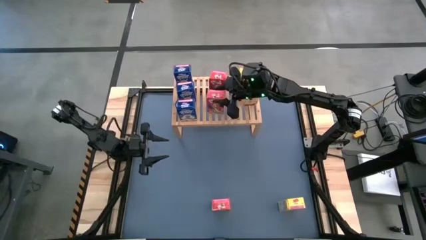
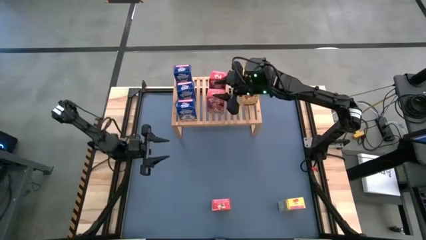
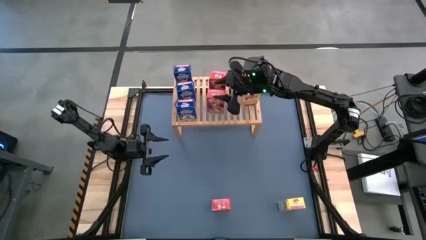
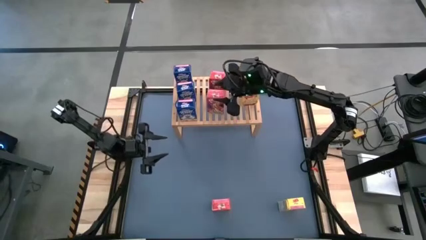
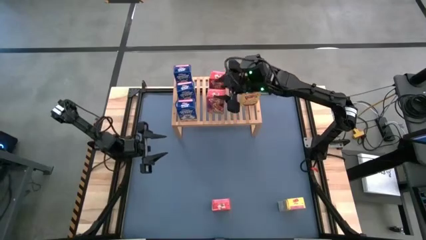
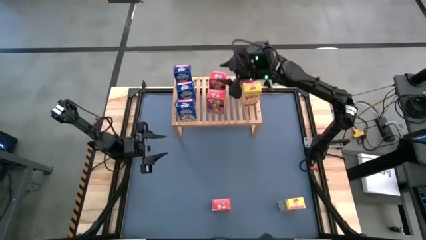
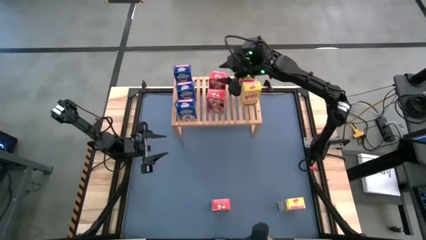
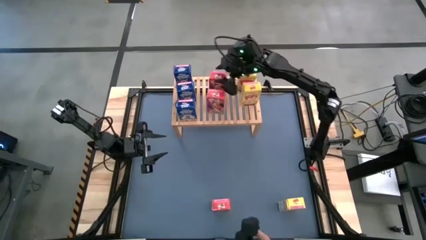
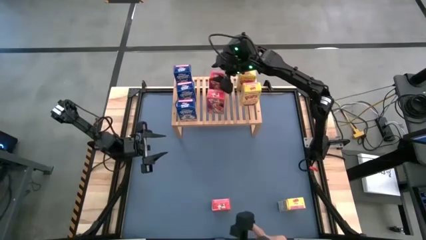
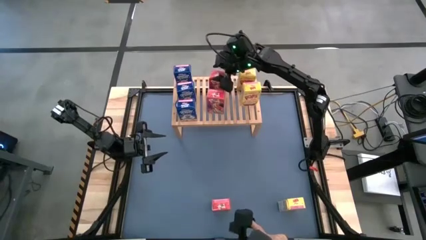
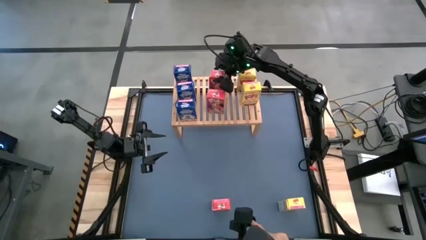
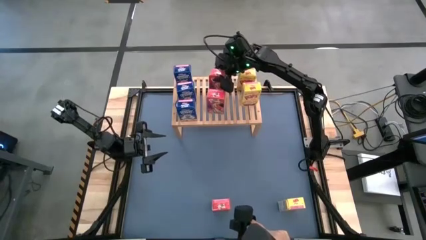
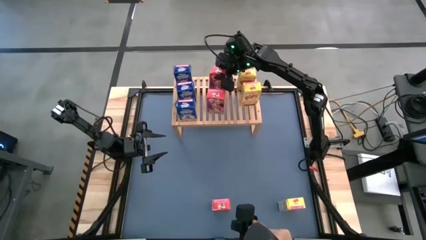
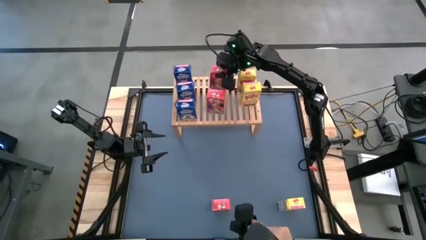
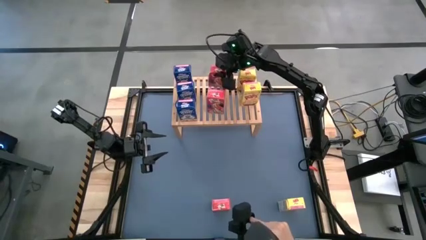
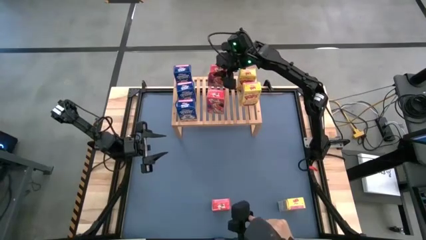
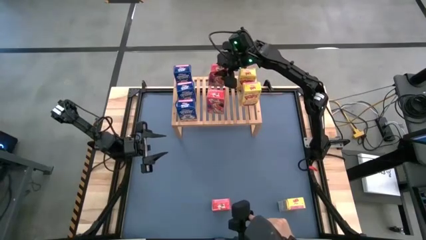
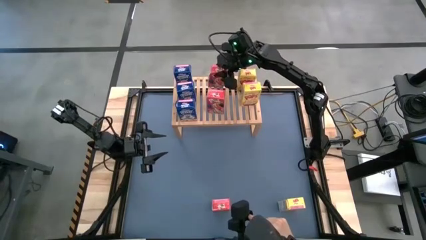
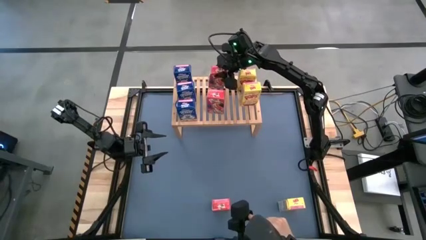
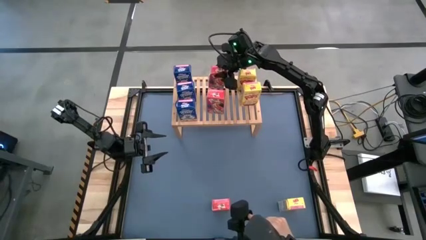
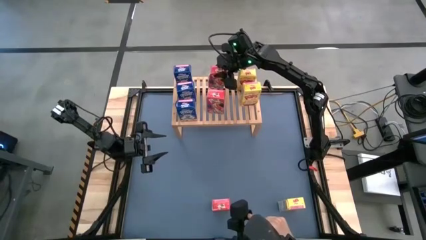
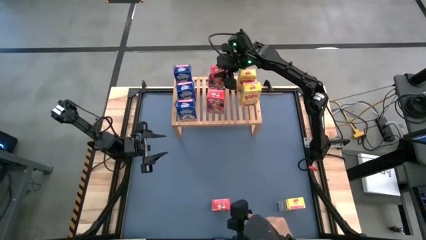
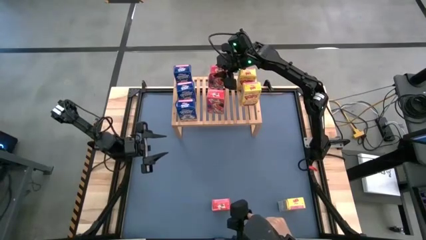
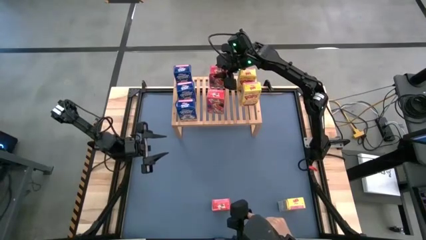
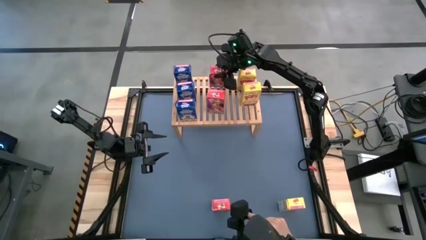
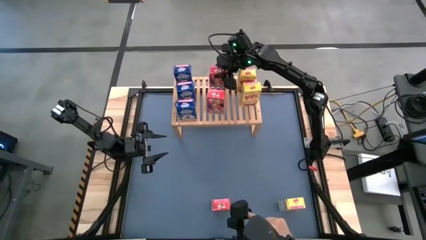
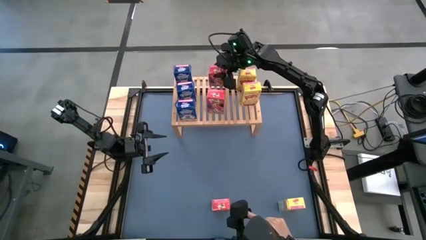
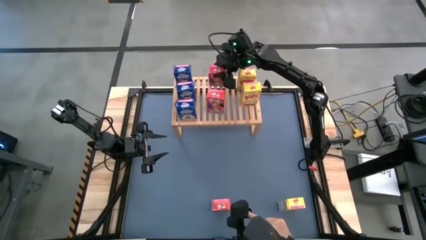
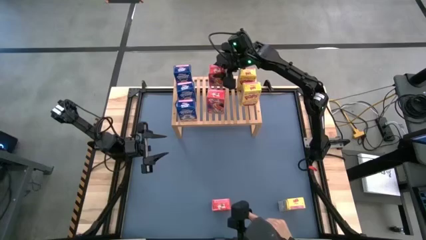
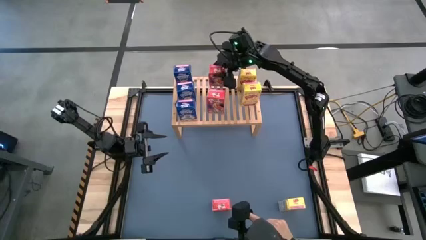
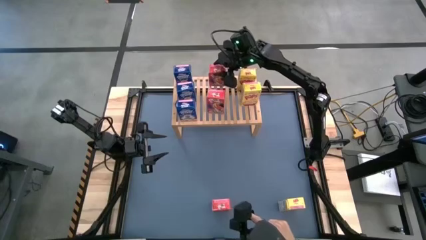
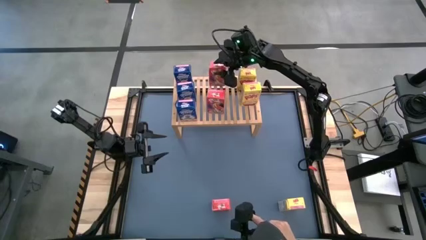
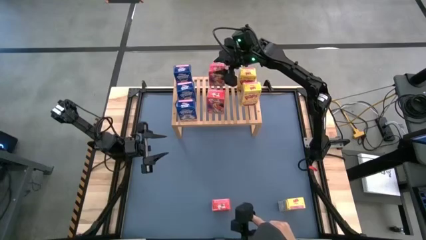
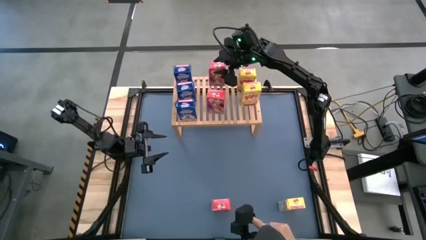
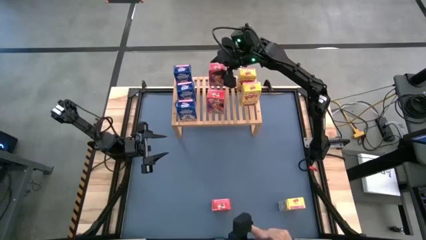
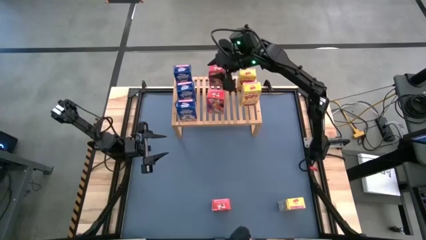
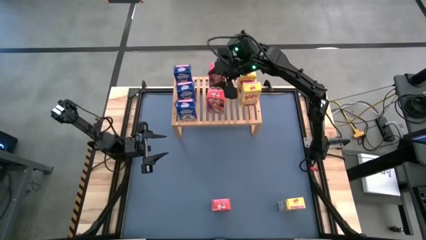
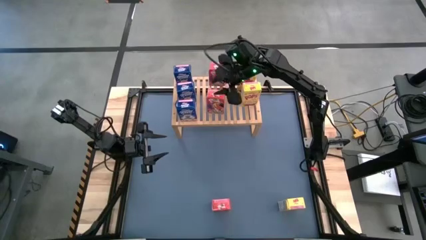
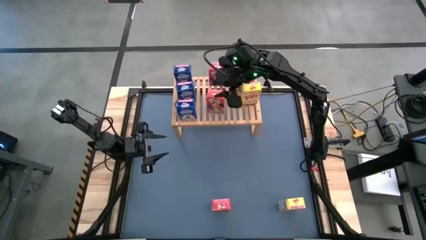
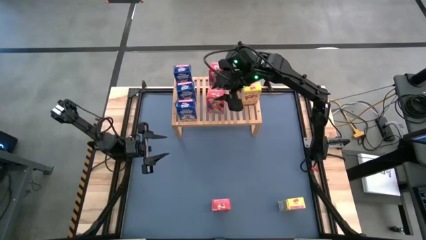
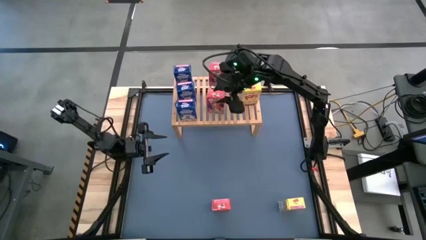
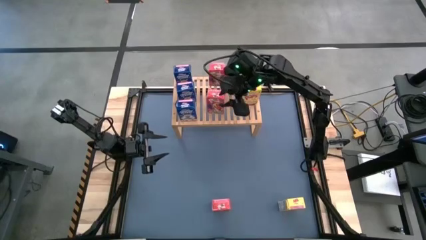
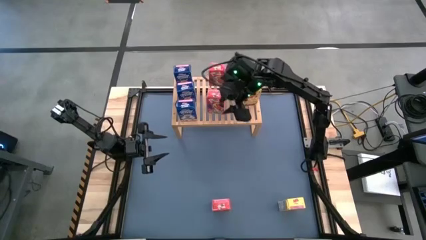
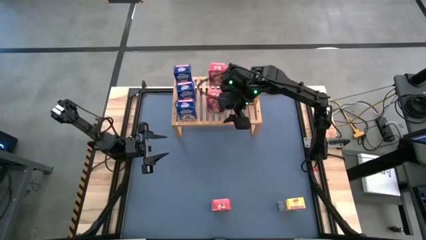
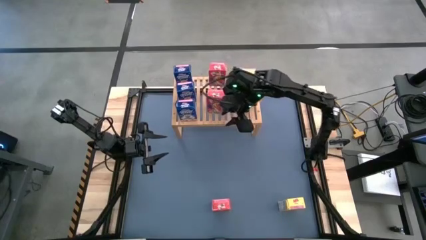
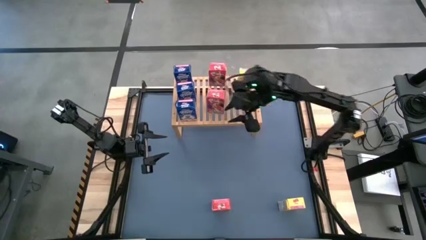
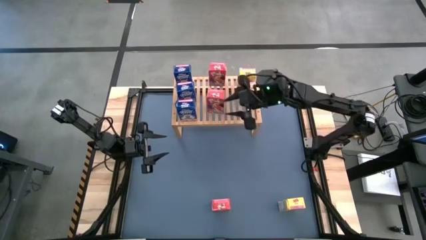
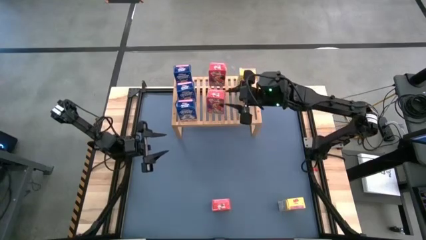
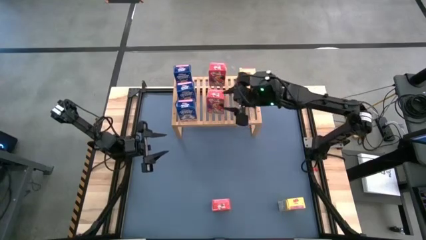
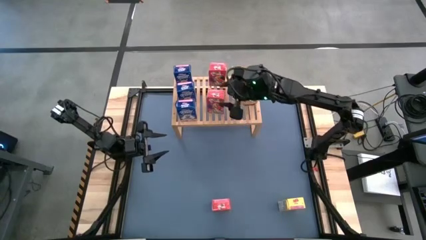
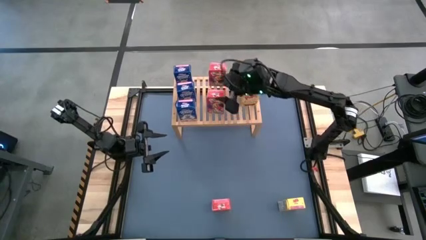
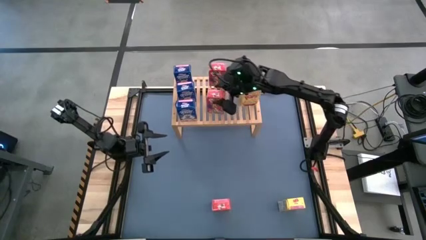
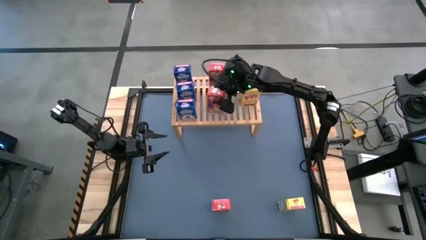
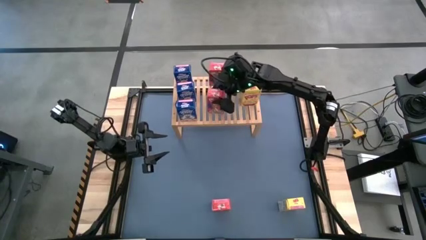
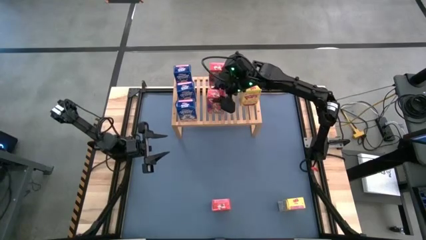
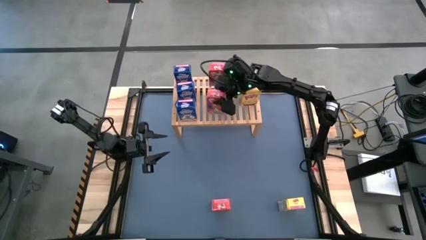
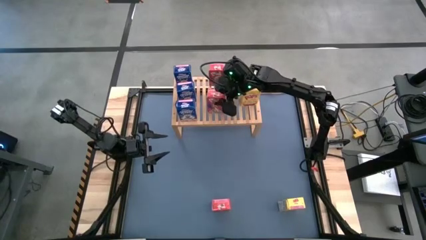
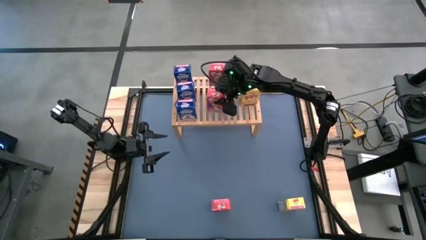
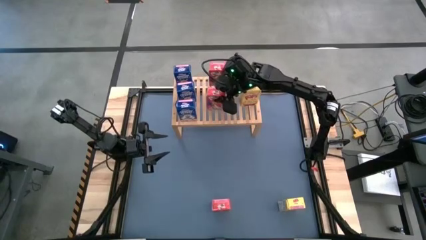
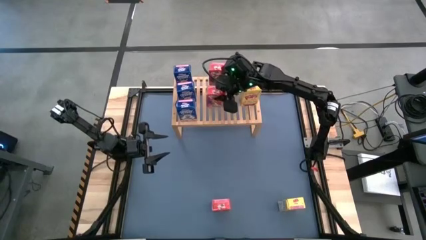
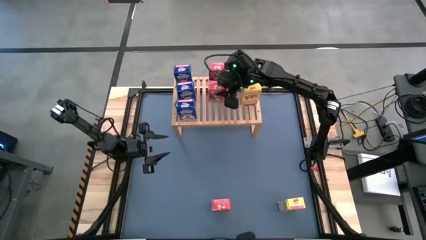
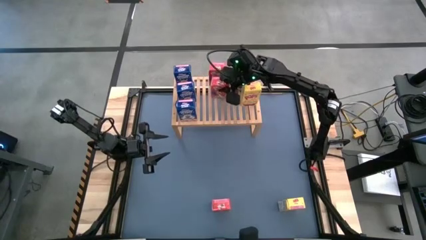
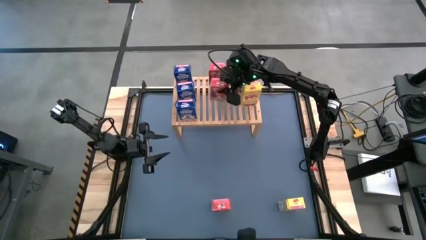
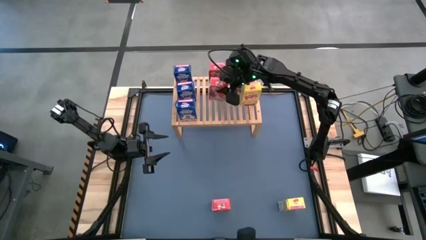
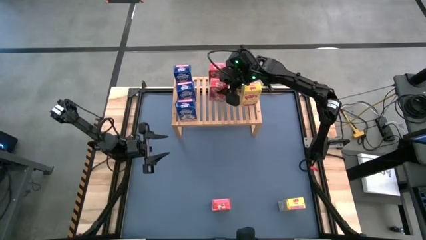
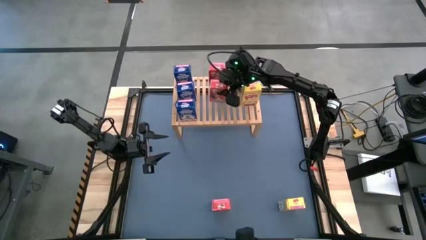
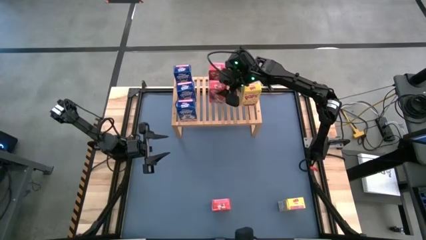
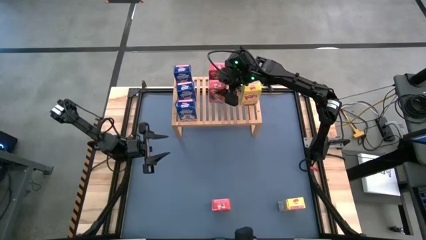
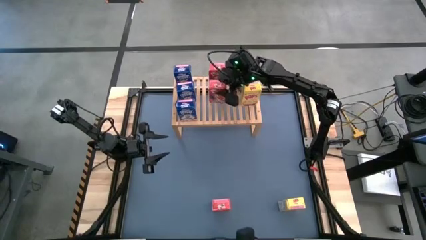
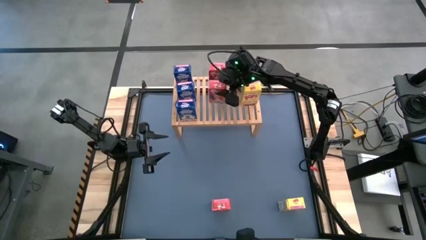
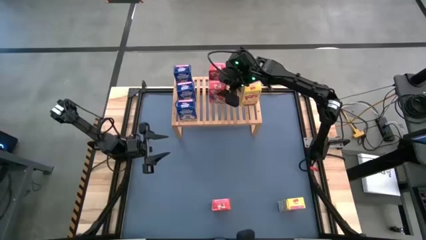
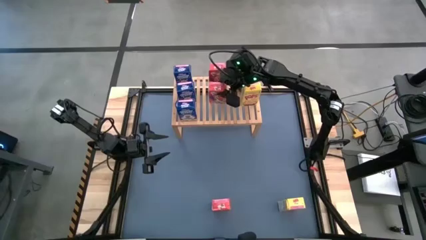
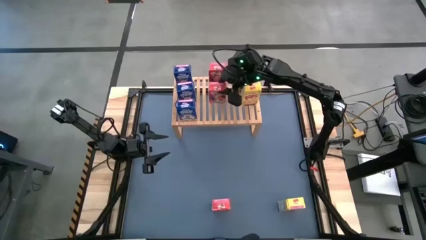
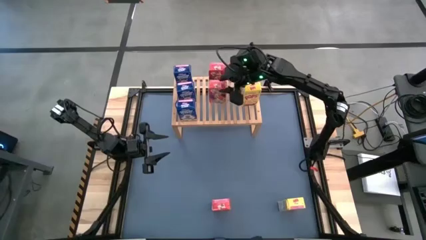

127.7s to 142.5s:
Task: Stack cereal on shelf
Adjust the red cereal boxes on the shelf

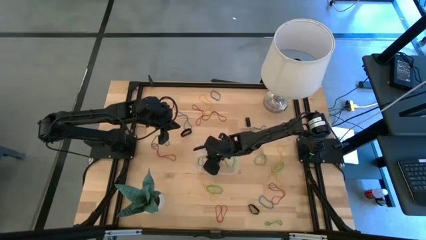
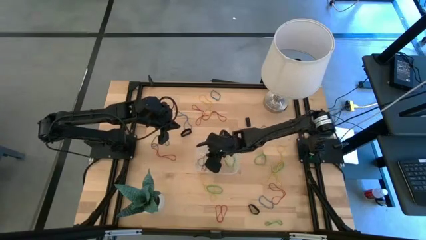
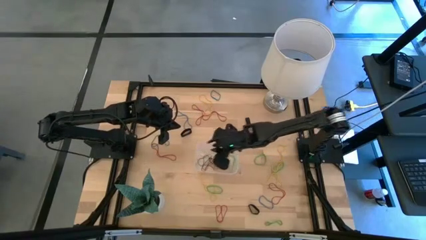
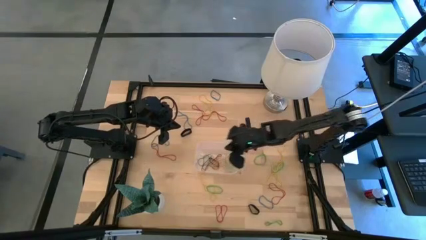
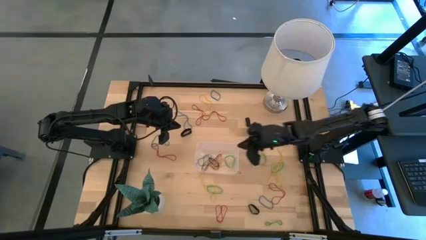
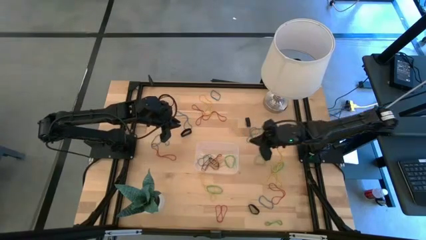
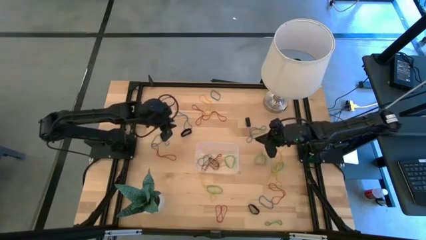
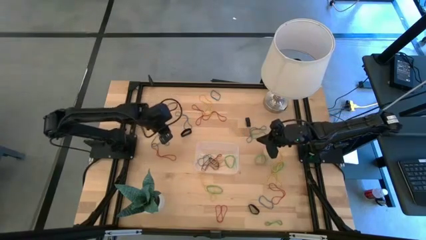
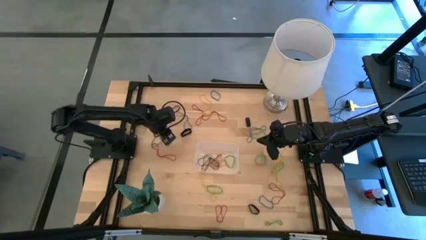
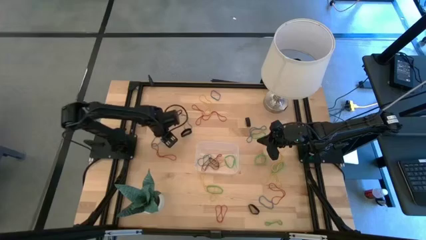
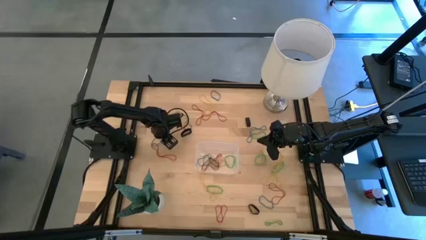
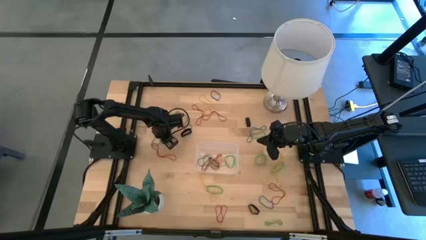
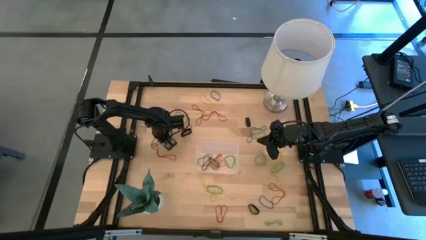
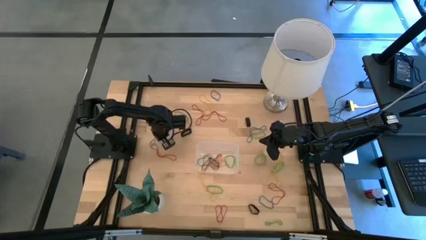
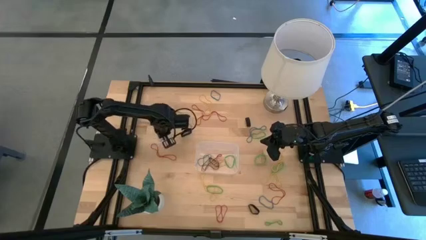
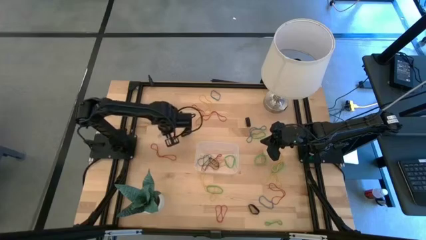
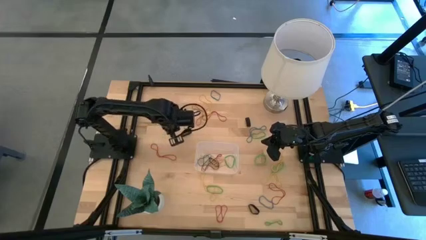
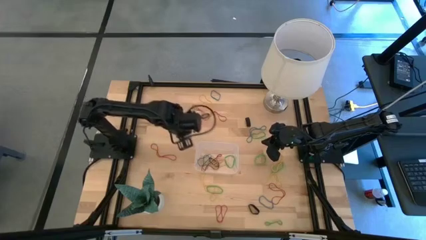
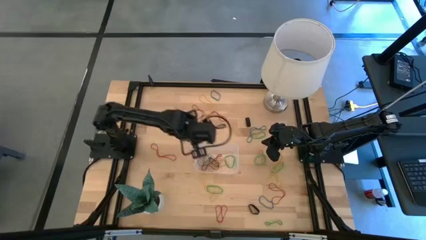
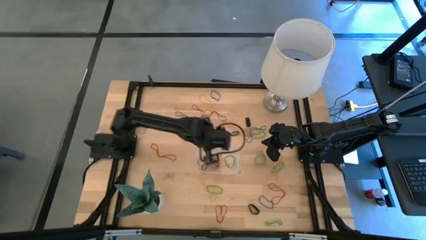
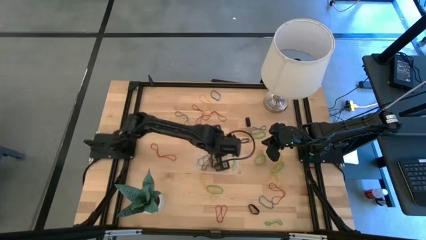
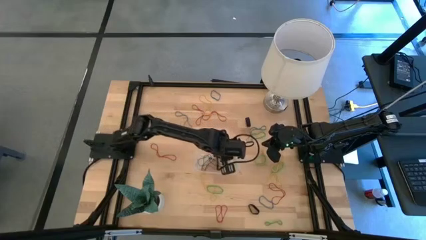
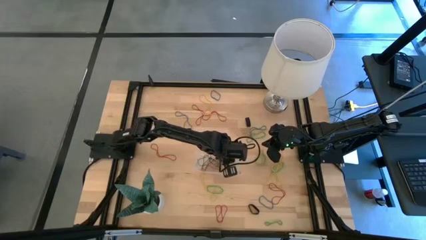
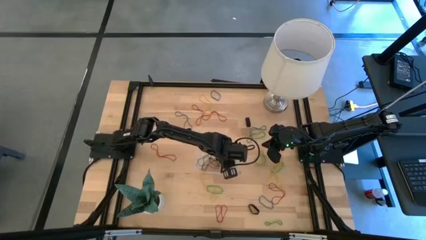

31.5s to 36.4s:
Task: Pick and place rubber bands into bin
Put the blue rubber band into the transparent bin
